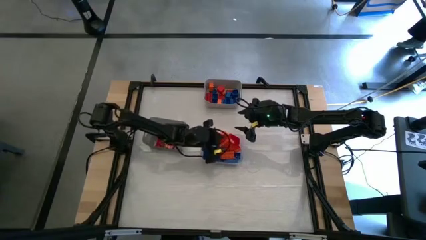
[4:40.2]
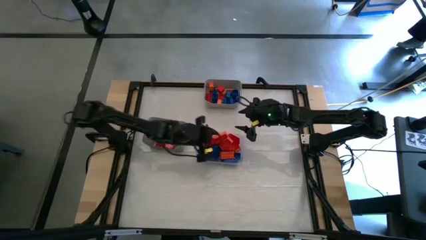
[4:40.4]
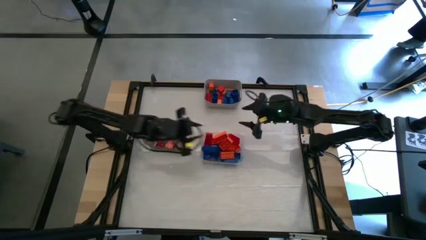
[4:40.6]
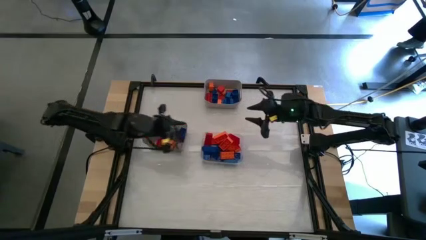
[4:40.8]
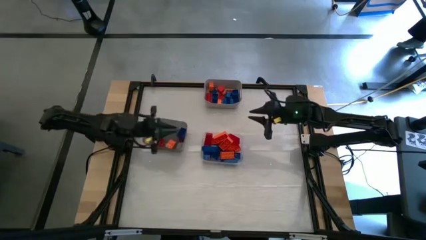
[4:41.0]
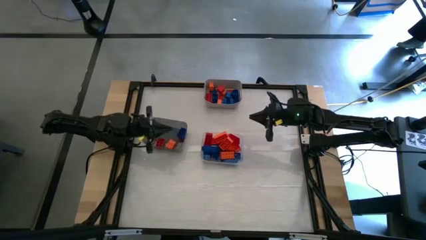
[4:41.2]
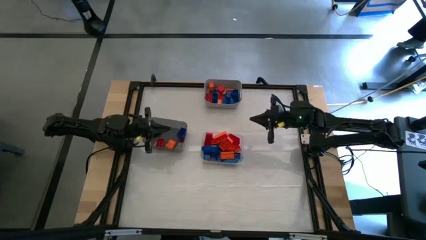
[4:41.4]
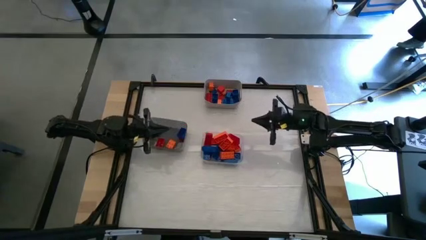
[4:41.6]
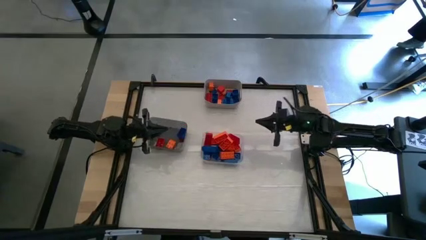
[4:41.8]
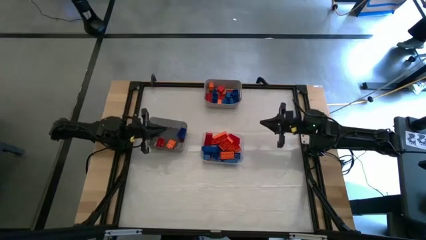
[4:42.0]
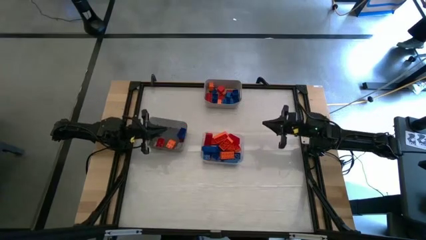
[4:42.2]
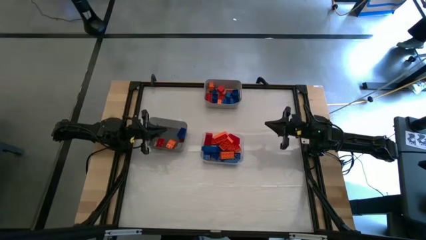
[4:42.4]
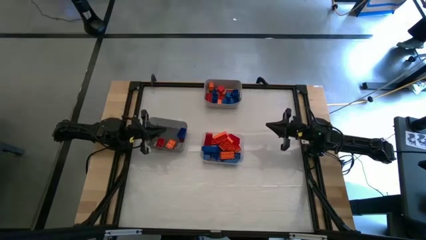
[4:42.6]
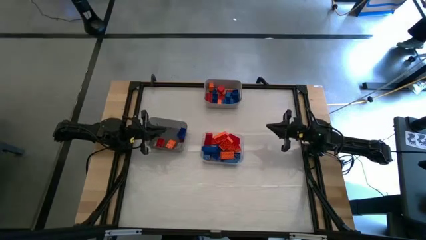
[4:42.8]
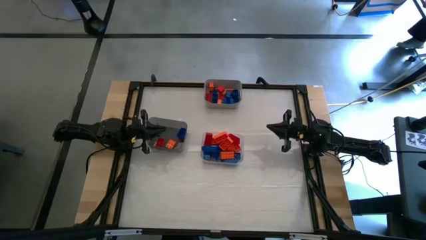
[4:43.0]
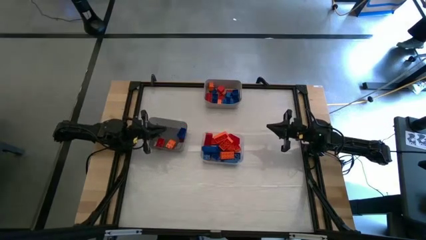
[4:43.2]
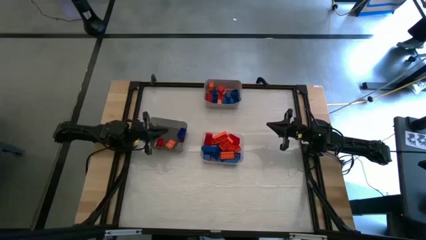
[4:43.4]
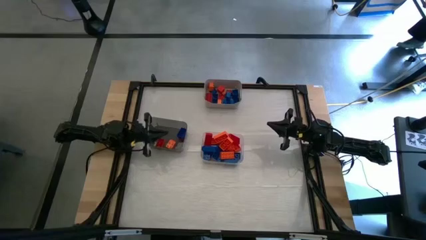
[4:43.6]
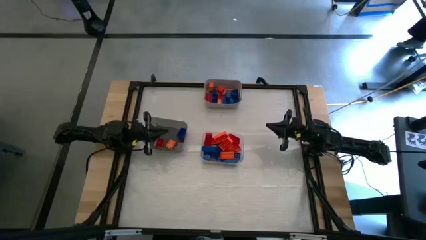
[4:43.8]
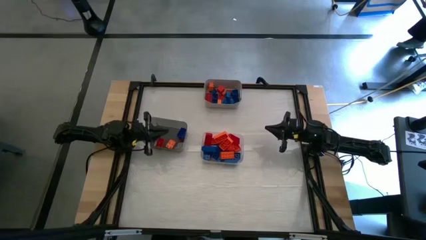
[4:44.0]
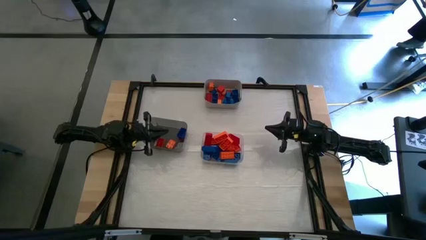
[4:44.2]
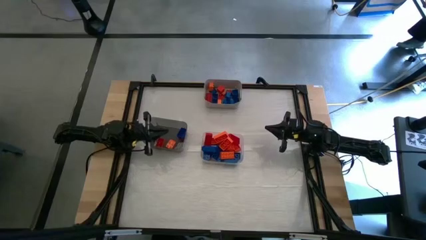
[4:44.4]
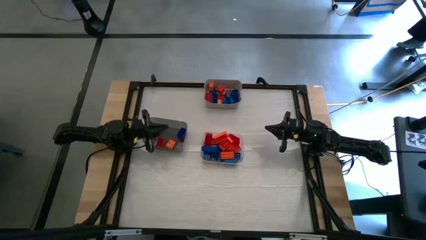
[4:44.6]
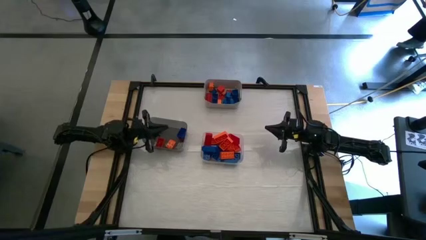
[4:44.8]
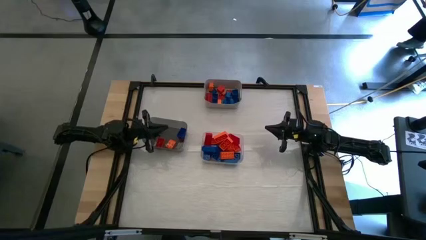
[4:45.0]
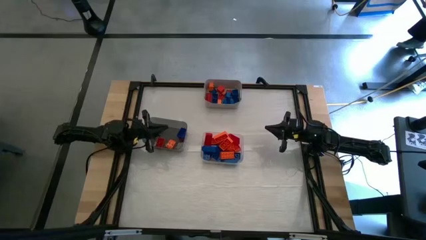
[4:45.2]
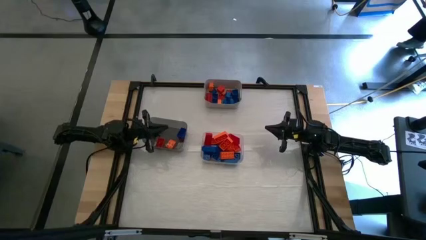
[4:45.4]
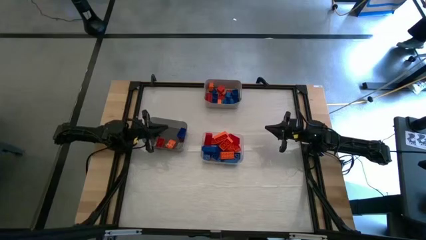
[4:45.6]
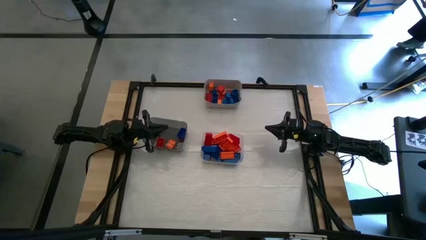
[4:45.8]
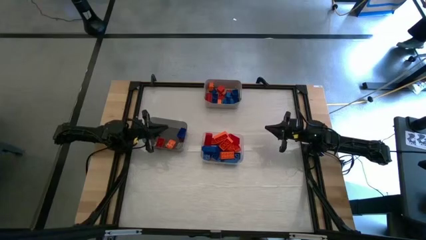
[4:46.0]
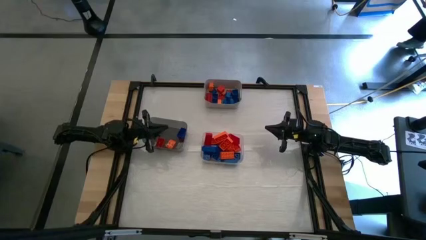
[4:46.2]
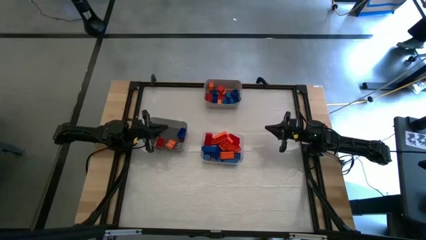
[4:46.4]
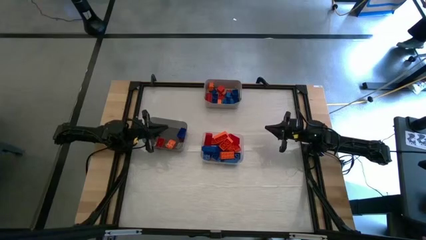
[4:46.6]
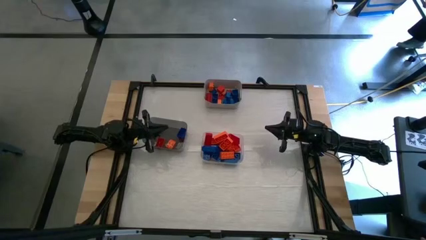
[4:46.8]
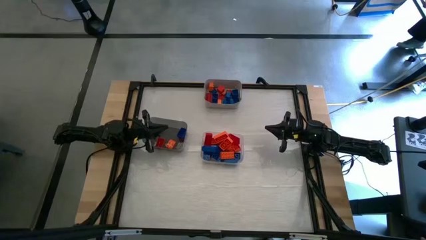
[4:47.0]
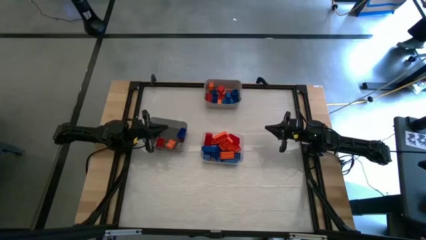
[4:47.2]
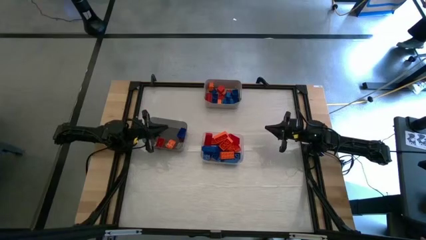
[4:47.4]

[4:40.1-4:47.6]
Task: Sort blocks by size
Return to Home Position

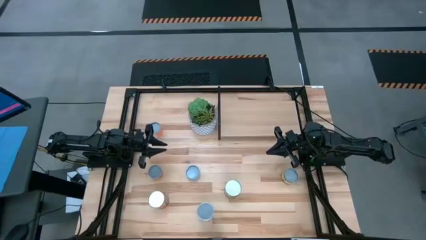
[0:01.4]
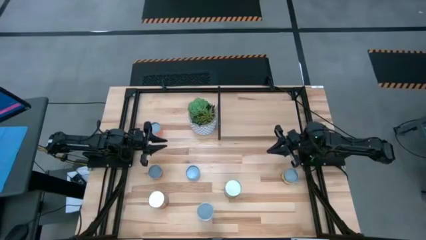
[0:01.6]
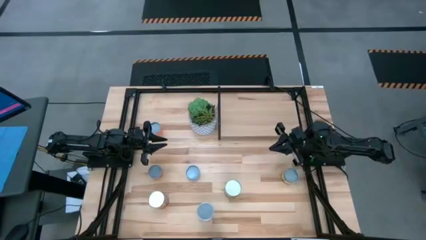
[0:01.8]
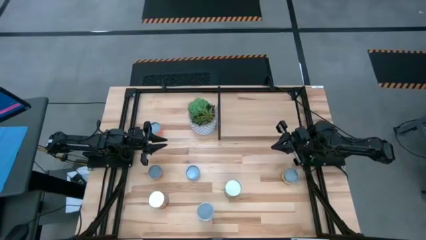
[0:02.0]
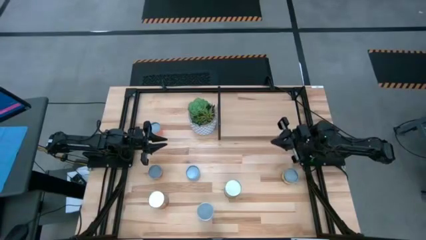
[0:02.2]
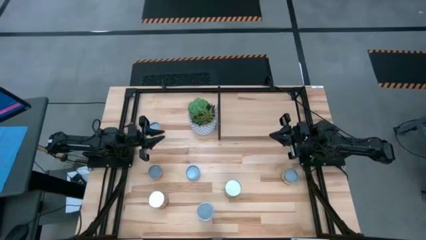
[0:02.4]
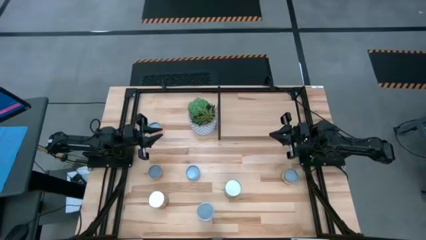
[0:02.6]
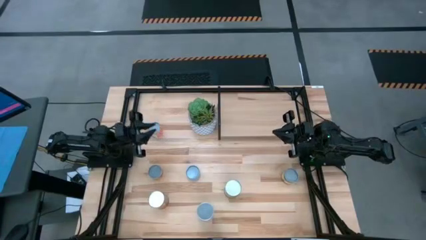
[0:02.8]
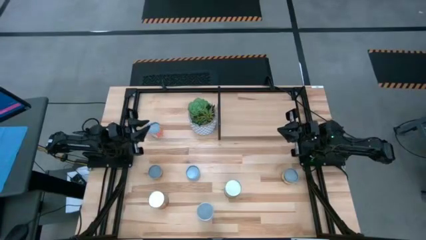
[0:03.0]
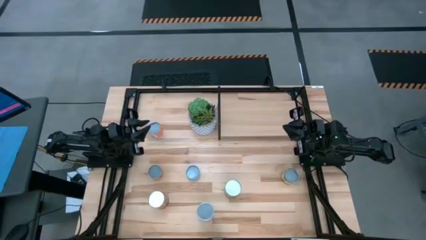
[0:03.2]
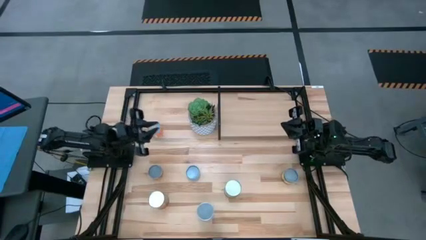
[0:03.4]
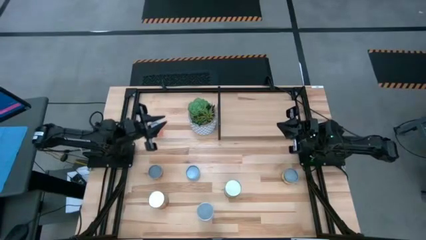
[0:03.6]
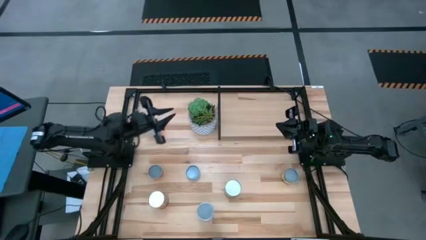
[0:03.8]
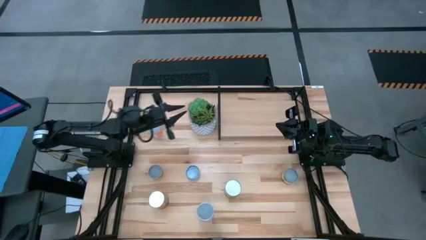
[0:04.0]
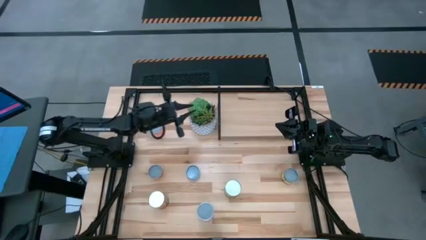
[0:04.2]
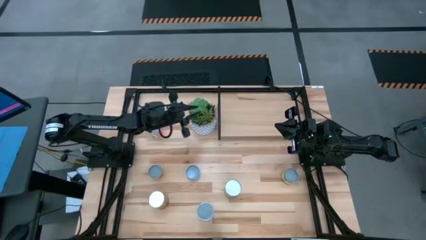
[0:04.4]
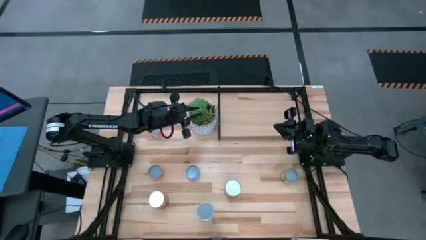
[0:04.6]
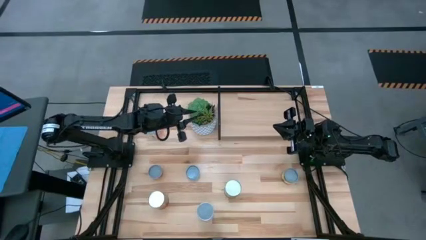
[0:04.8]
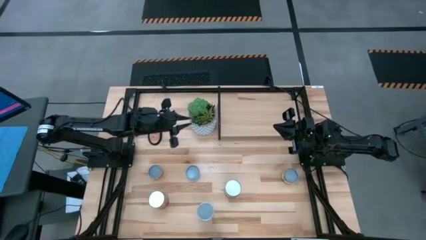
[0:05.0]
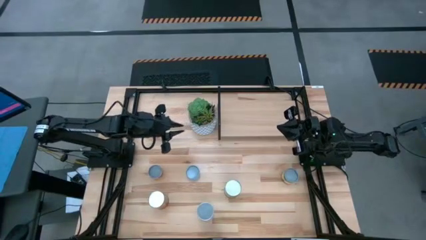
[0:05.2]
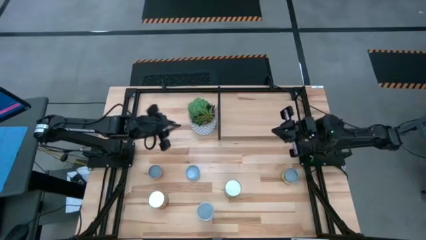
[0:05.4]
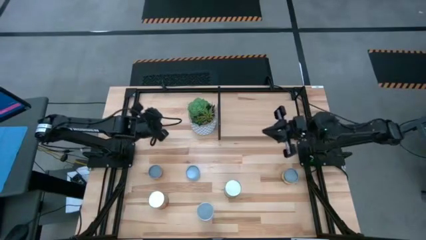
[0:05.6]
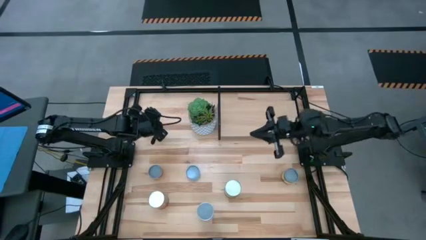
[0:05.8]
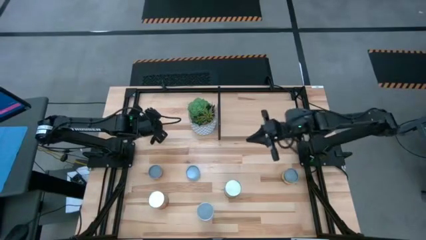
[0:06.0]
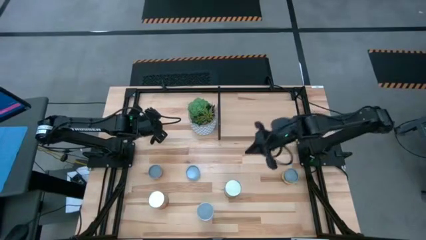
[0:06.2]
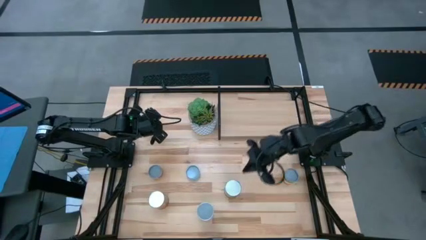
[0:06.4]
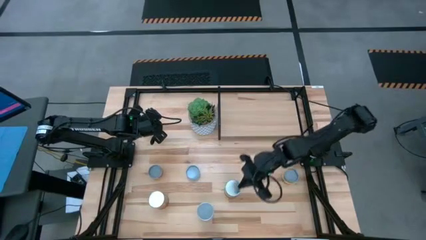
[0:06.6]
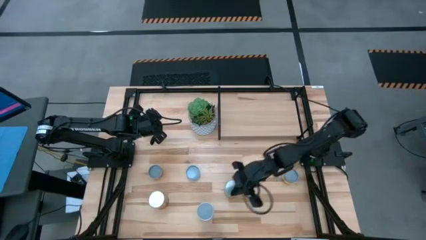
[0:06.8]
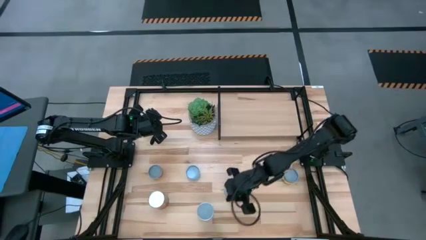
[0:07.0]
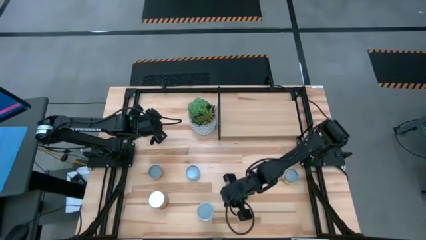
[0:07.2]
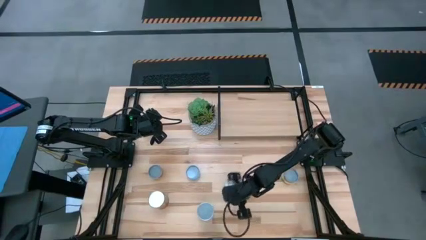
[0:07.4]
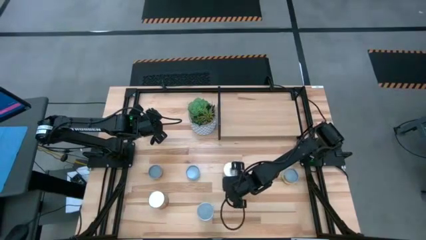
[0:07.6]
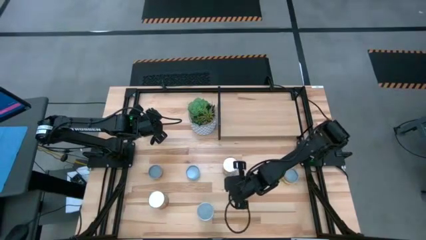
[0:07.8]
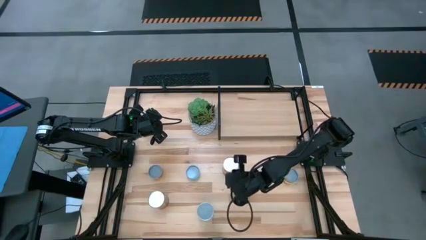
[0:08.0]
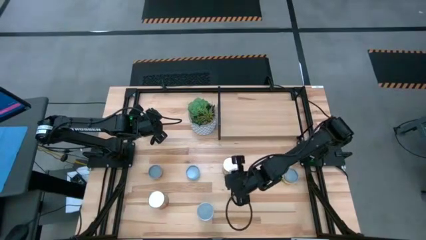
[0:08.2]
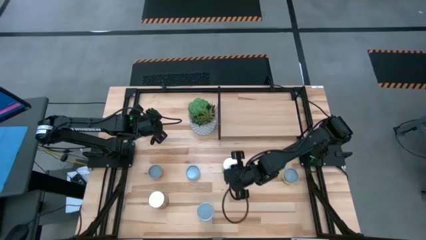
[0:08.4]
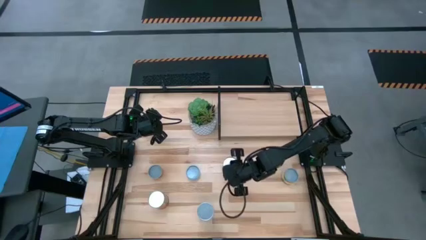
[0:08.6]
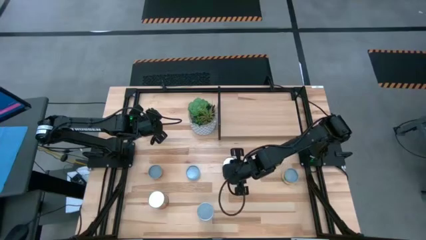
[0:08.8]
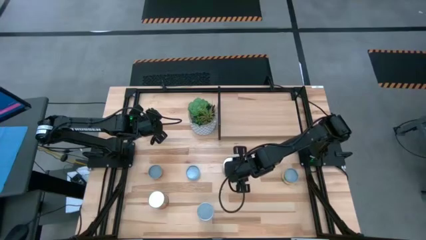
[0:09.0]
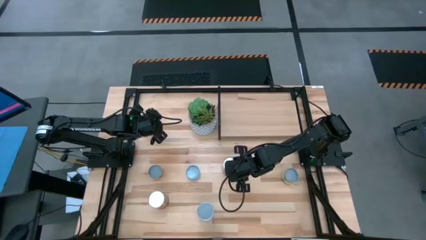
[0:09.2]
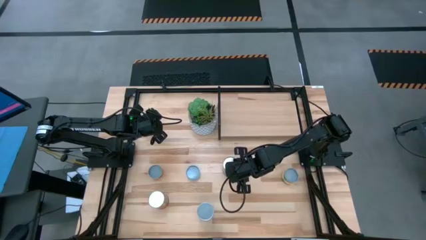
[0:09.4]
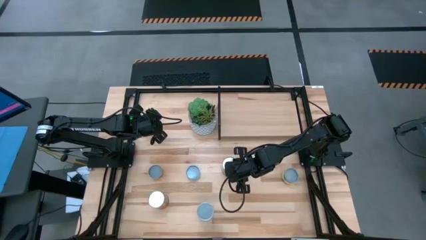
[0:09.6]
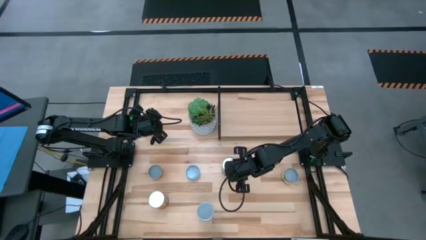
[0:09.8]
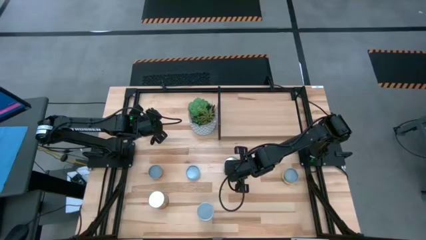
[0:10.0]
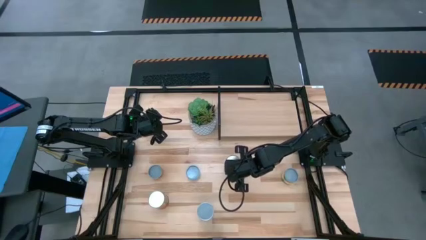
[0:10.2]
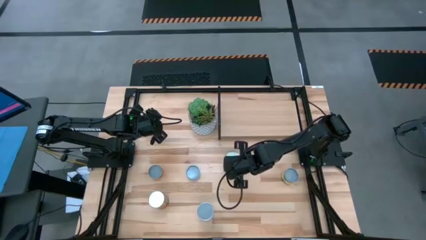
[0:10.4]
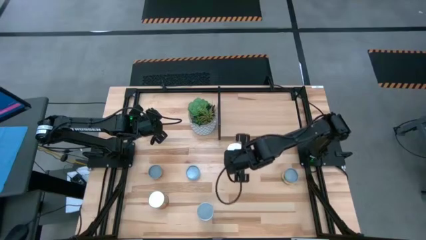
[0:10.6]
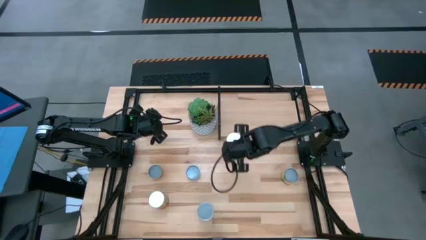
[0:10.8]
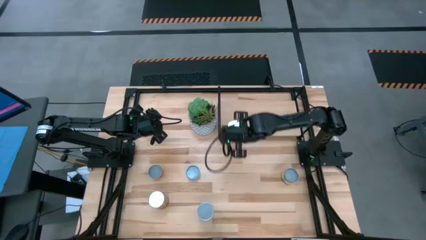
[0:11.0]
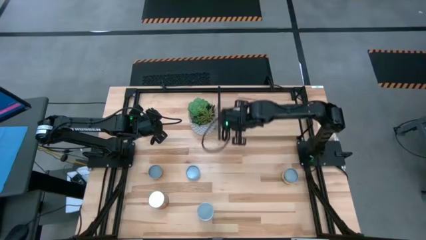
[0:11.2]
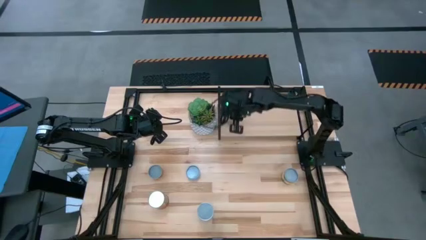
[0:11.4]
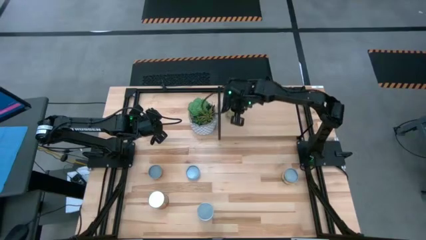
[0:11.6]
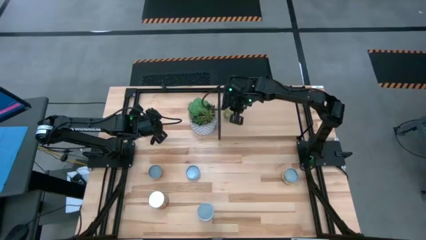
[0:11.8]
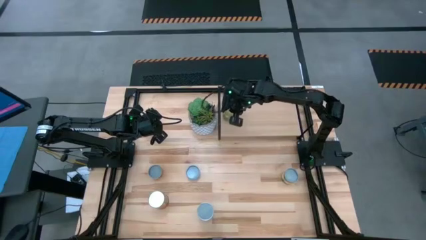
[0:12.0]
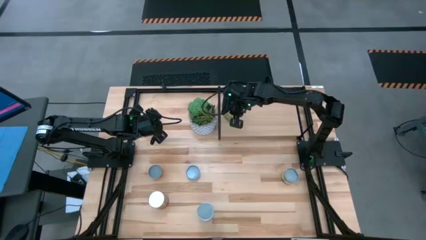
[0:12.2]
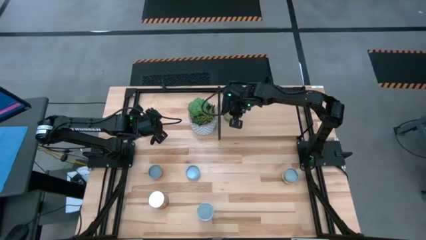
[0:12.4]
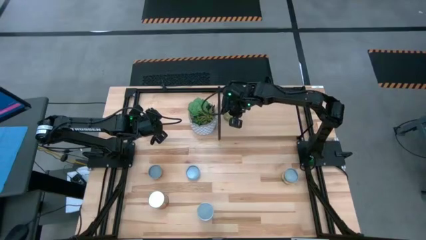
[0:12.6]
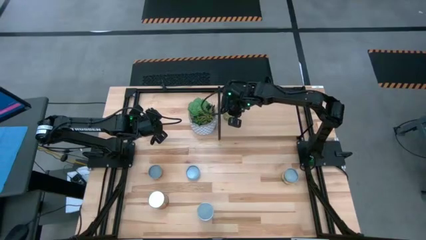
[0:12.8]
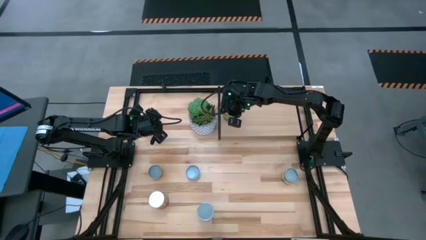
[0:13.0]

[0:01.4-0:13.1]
Task: Pick and place cans onto a shelf
Put the canned pears on the shelf
